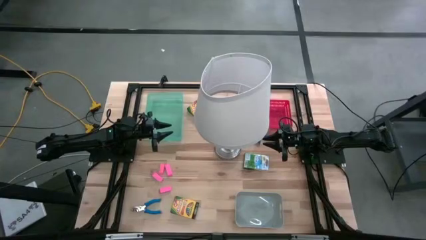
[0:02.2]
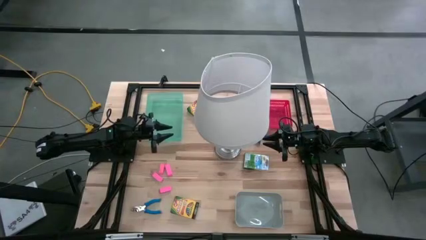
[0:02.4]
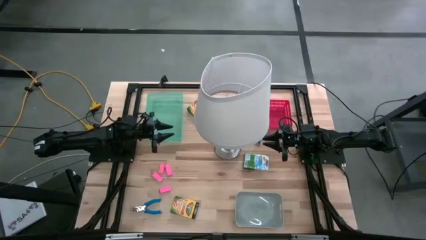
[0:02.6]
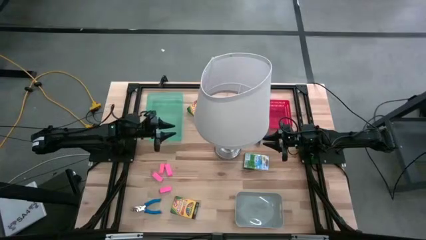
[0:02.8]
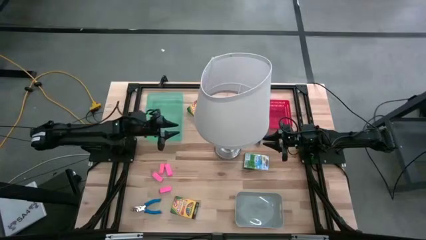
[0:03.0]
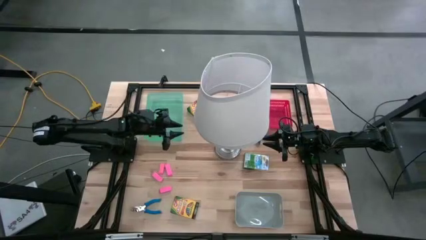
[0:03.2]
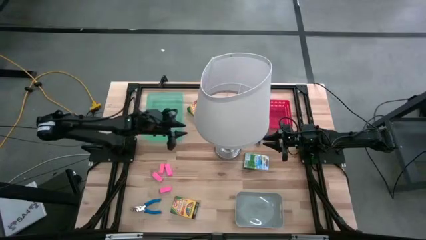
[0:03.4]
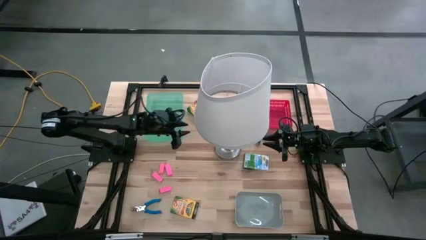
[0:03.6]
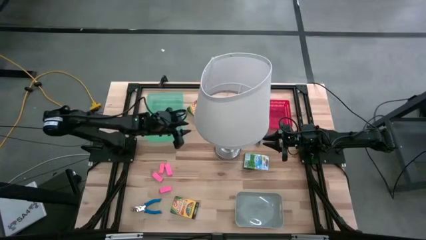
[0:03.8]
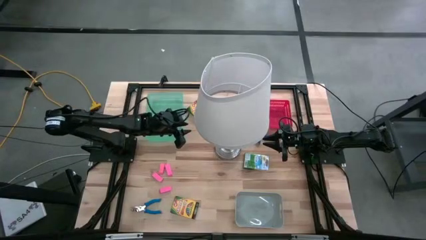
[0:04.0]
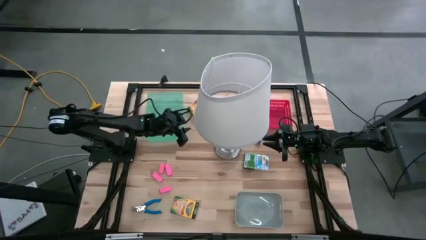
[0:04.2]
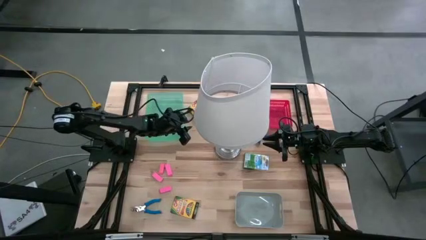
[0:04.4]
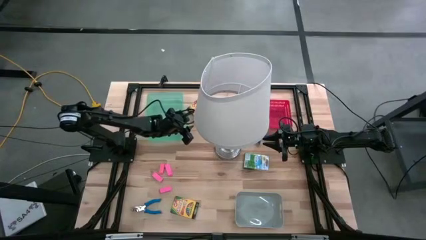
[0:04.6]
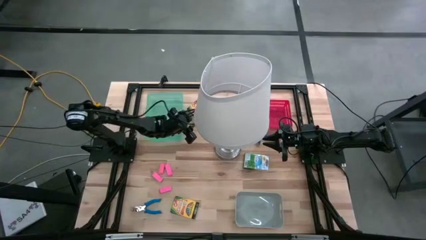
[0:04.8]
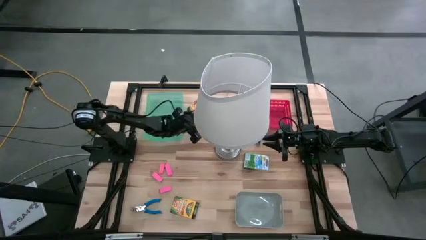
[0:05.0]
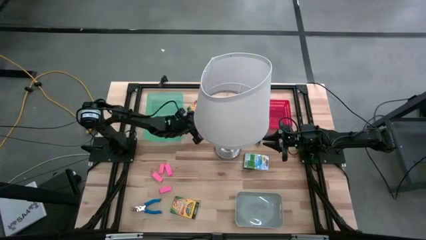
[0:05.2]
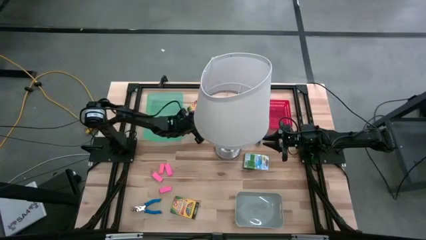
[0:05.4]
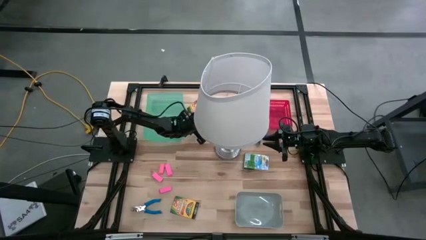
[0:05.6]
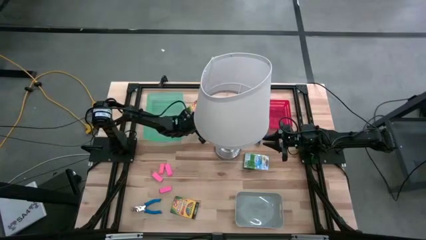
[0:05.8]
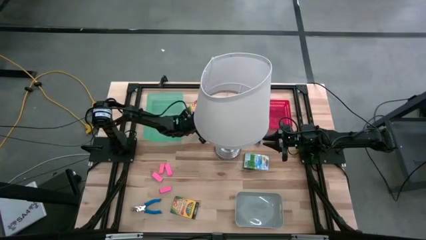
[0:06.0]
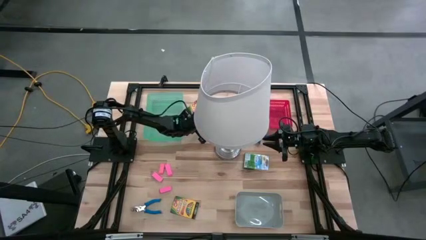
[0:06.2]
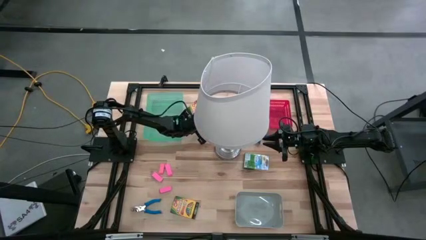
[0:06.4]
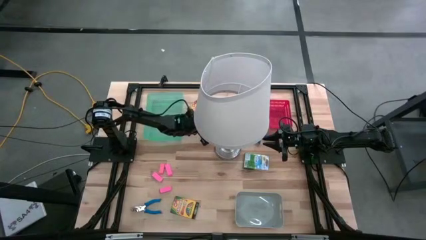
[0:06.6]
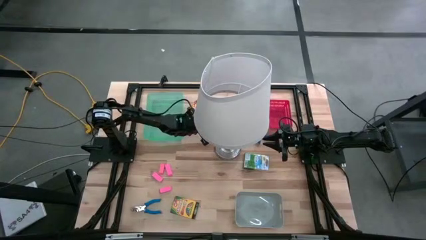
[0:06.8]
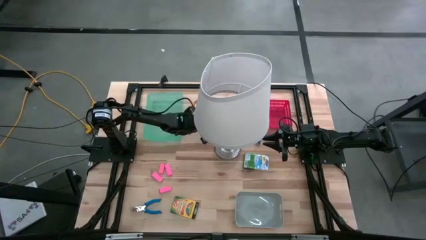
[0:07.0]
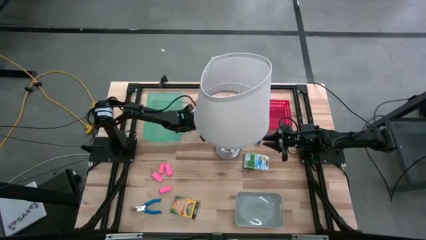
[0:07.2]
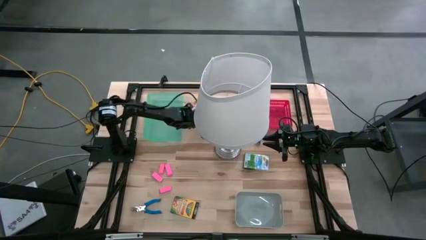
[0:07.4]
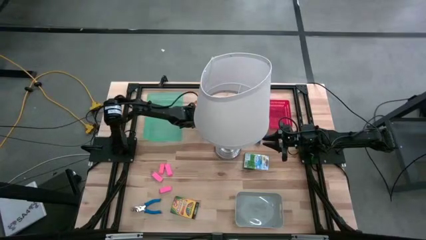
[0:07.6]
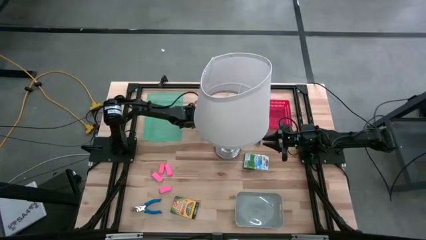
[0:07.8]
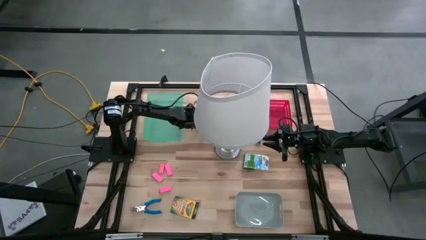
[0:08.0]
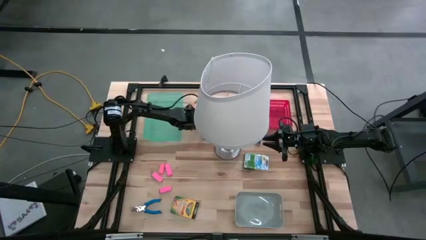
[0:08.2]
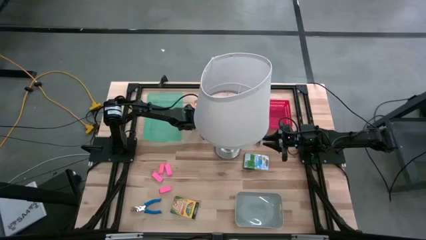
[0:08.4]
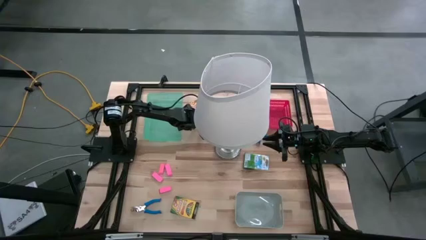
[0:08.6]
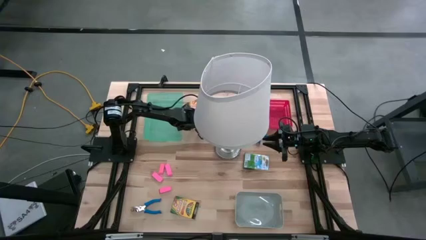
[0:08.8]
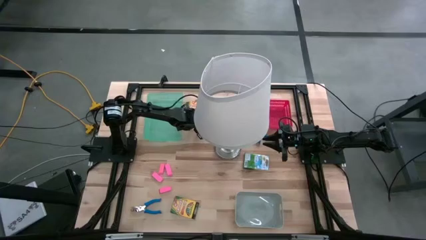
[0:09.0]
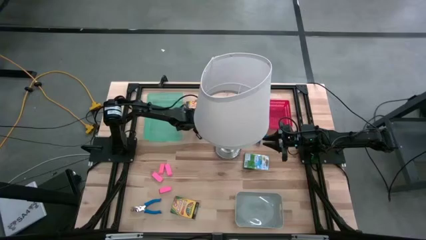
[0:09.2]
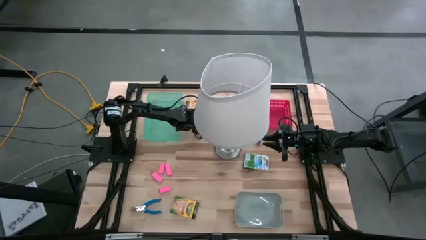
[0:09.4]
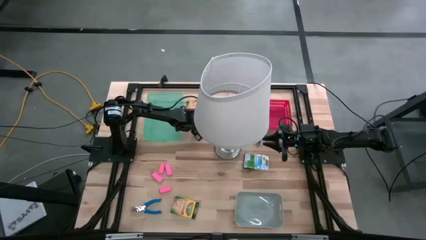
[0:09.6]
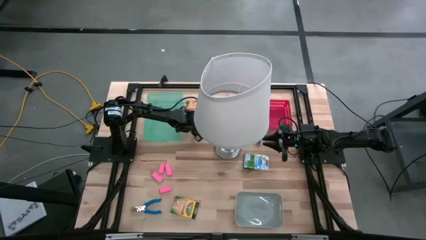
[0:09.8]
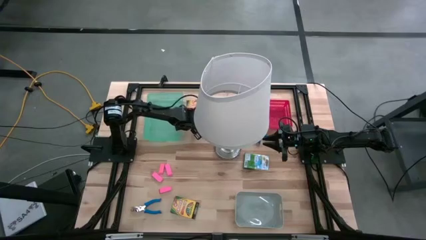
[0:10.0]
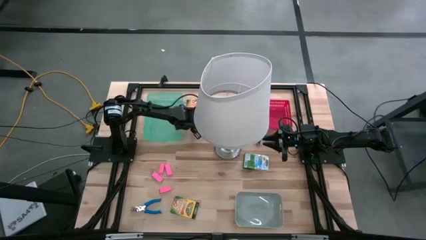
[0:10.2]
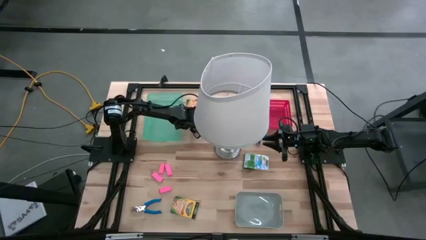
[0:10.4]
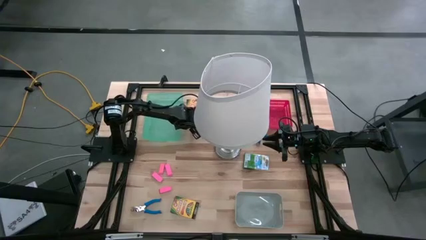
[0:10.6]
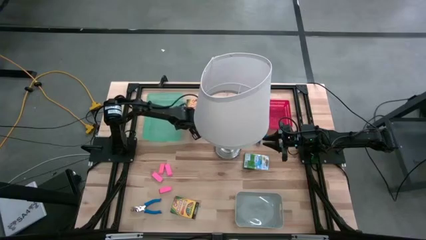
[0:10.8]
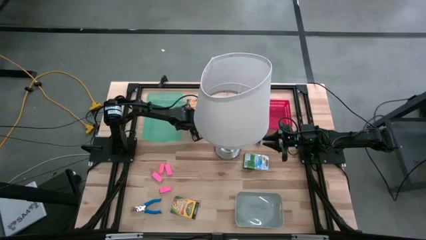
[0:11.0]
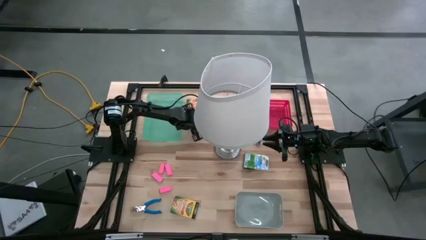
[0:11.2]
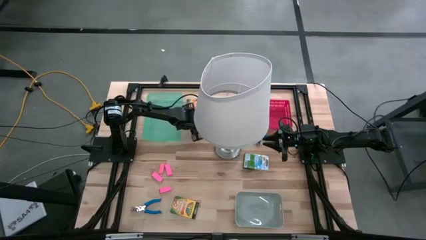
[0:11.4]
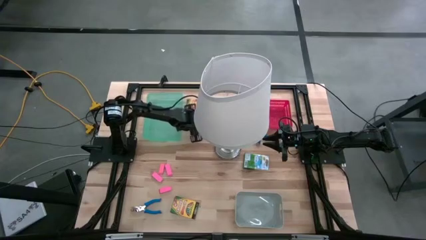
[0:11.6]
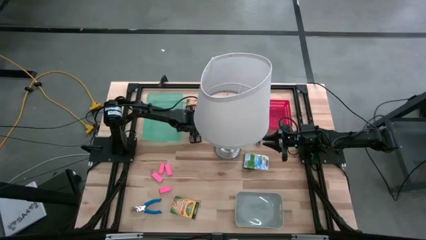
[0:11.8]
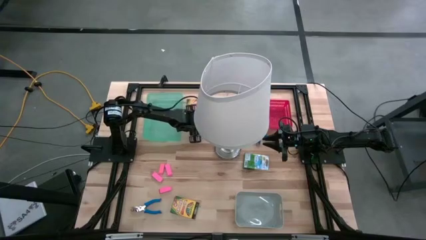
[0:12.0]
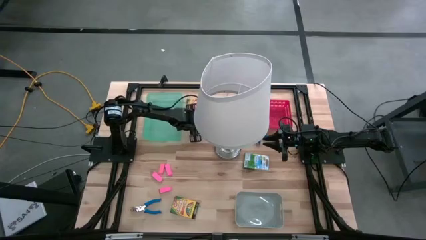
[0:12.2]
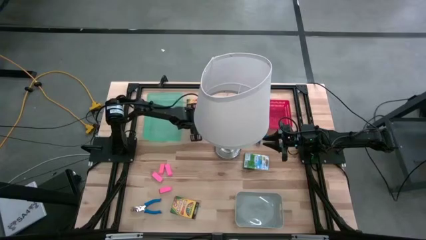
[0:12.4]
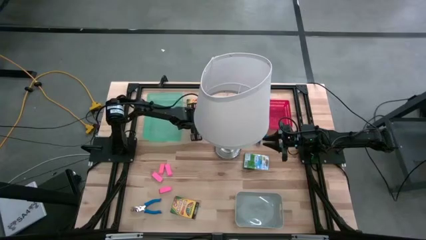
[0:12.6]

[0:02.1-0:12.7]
Task: Pick & Place School Supplies
Put the yellow crayon box into the green bin
